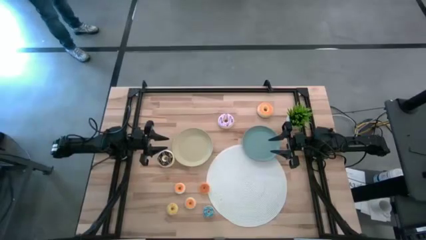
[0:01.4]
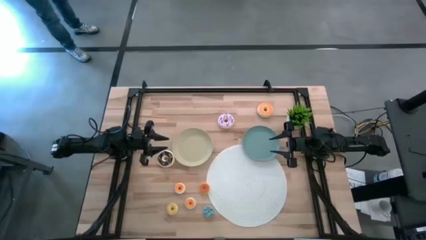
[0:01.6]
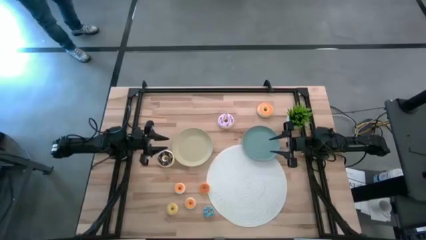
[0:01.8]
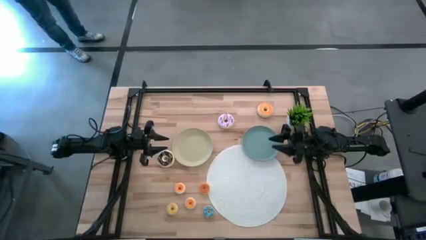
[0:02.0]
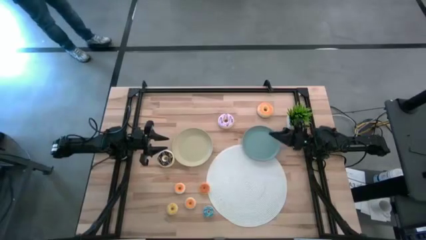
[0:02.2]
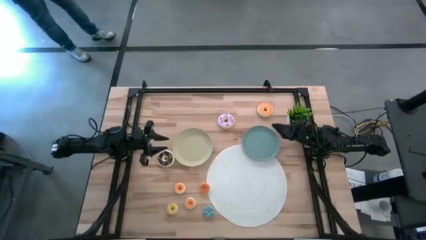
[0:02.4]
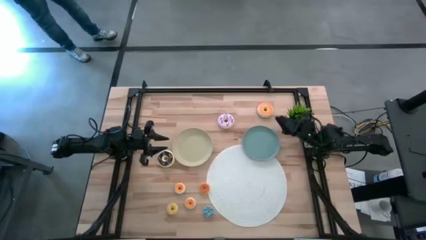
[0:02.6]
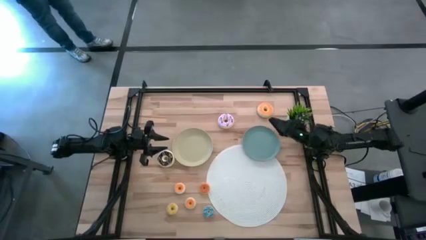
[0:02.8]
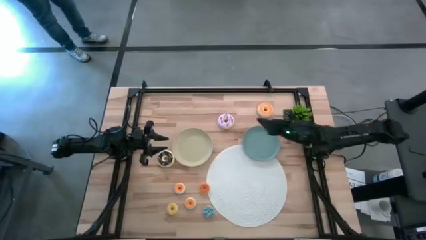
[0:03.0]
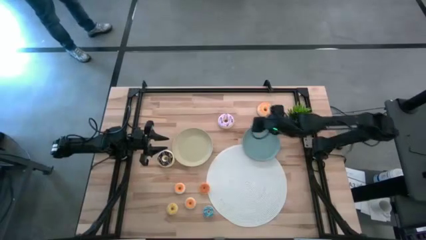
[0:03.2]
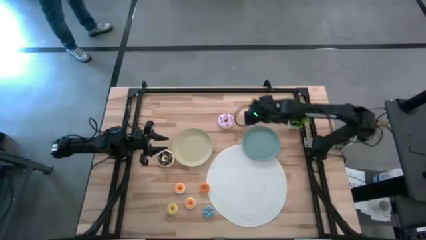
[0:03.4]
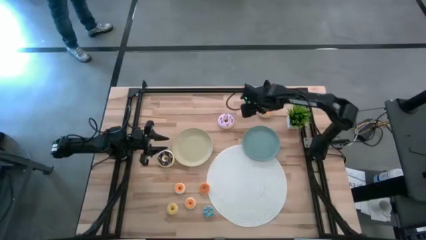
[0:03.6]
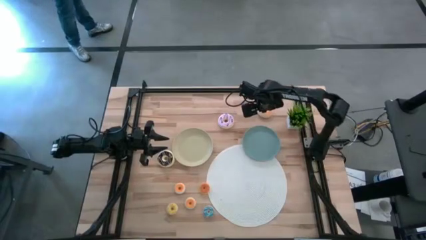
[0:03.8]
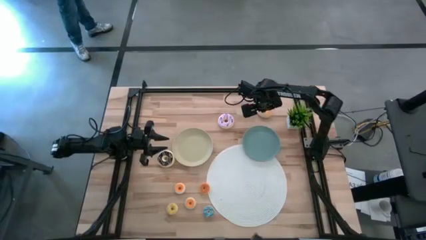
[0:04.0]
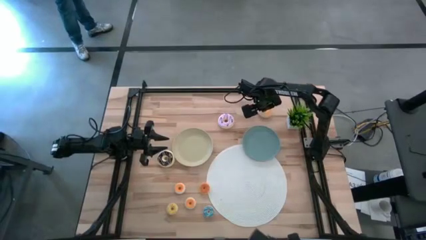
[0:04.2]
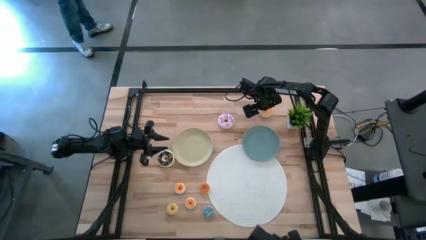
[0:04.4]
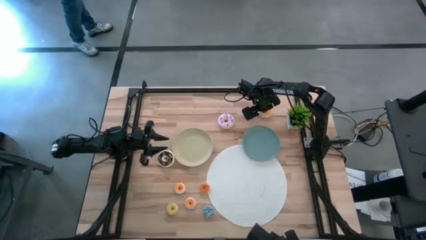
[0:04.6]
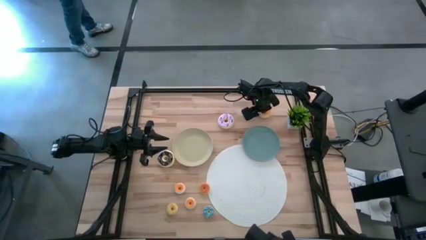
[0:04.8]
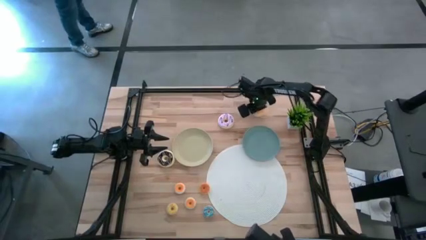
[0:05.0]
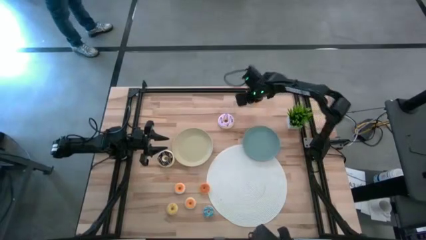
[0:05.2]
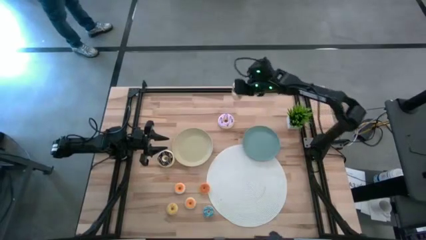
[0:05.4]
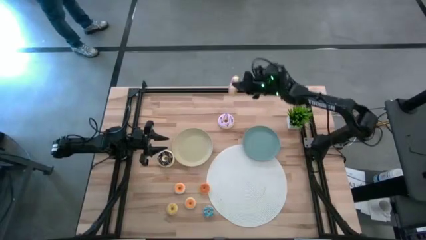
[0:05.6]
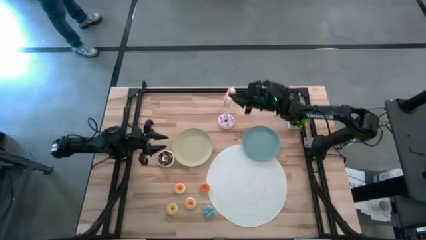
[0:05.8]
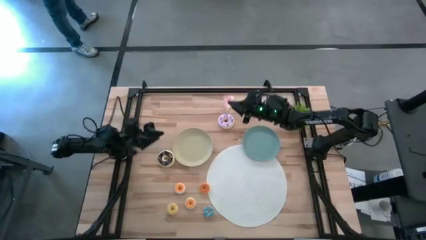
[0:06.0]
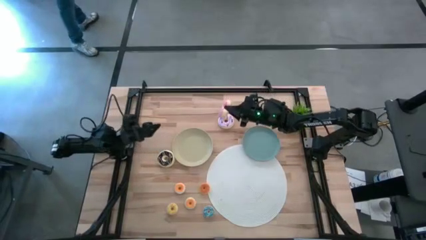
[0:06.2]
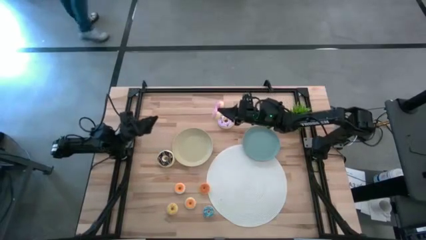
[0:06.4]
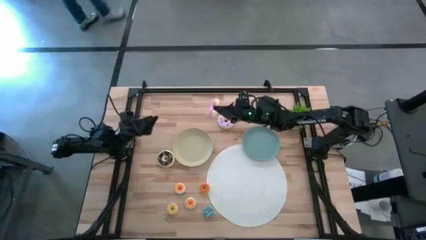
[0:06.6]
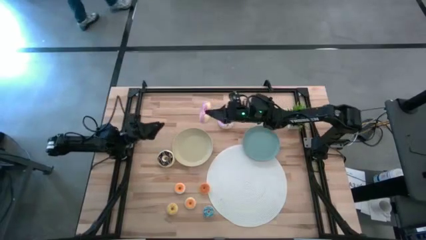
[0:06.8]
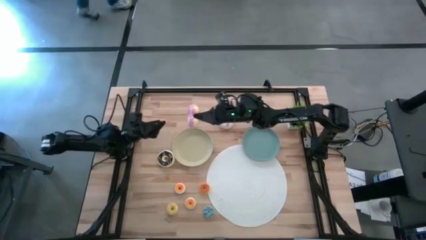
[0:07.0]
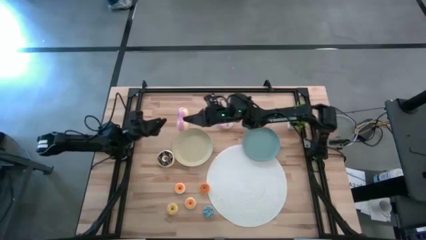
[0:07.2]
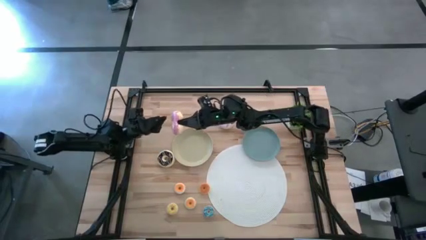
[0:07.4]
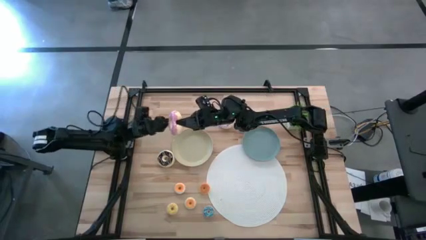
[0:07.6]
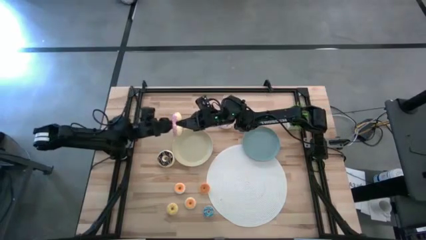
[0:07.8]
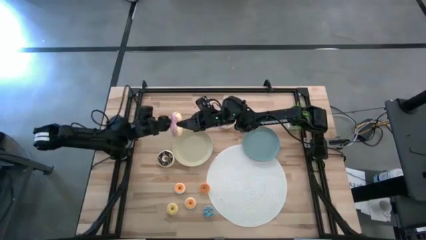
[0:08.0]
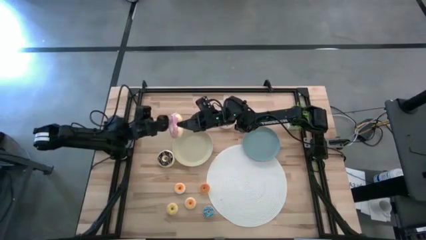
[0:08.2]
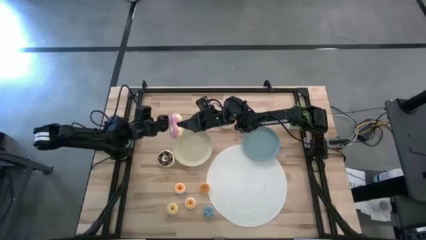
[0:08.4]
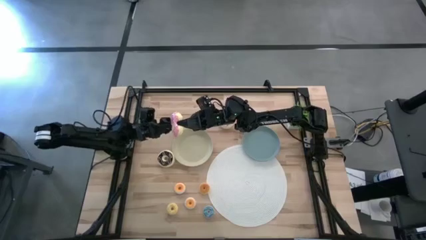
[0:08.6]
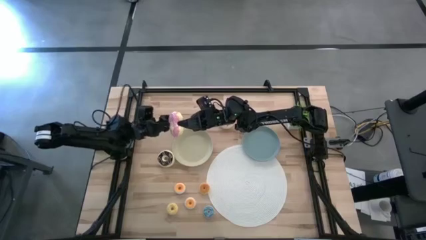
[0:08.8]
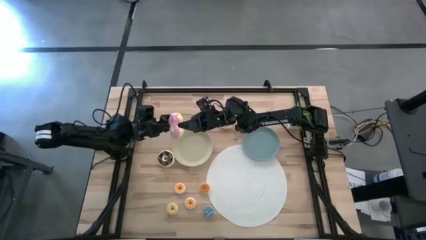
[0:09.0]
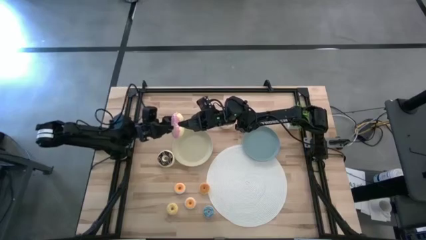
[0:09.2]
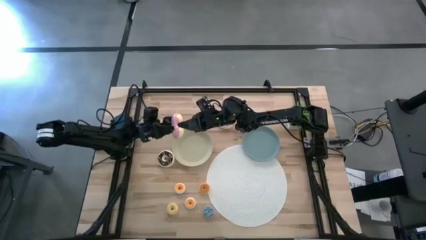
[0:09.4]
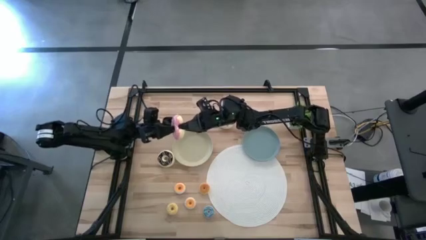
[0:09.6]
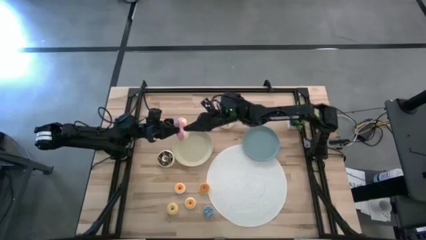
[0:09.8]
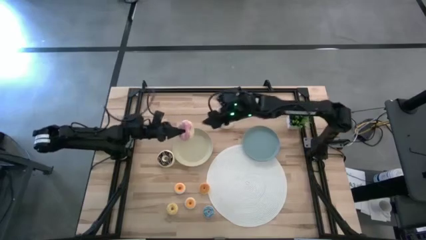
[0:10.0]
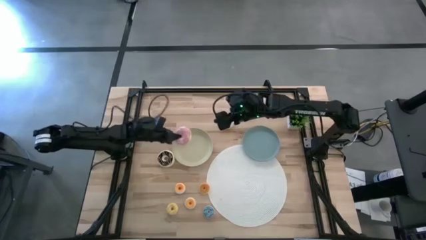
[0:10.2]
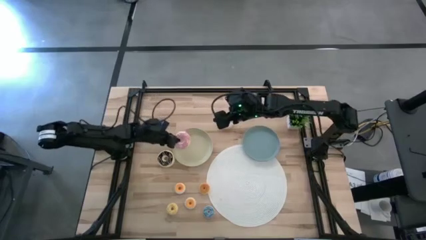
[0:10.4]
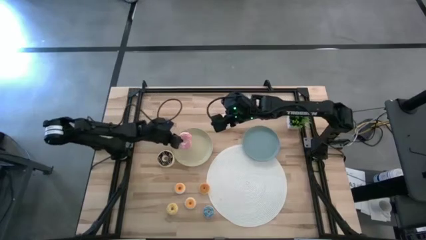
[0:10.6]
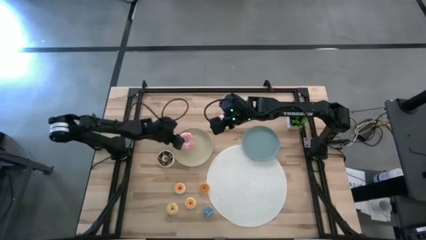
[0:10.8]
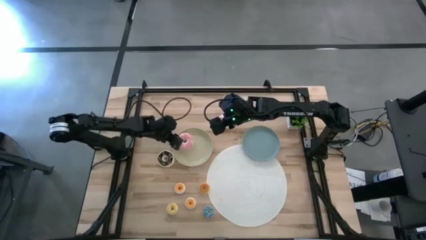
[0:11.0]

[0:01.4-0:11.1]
Task: Pick & Place donuts
Put the large pink donut on the brown plate

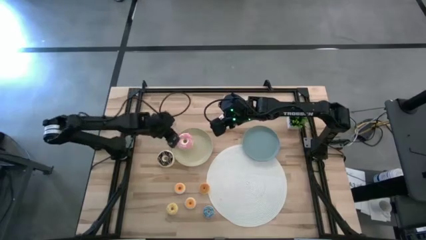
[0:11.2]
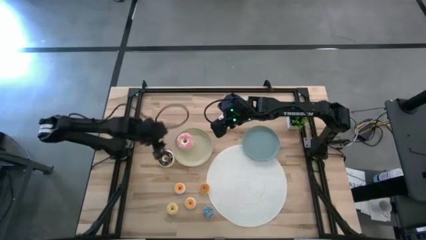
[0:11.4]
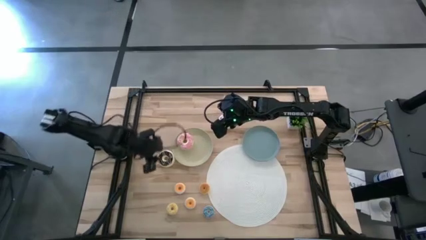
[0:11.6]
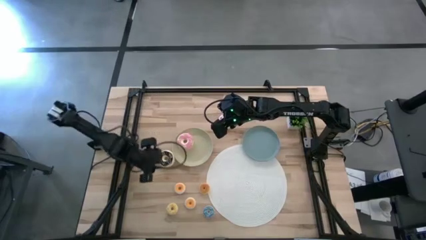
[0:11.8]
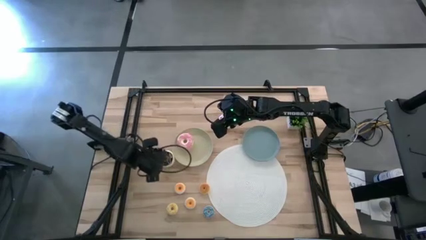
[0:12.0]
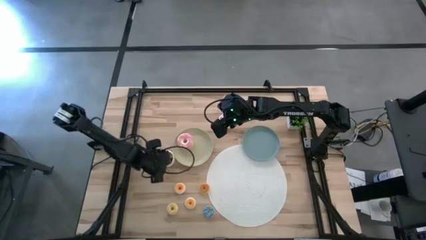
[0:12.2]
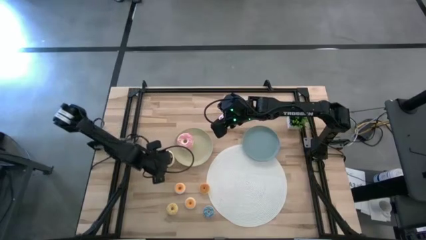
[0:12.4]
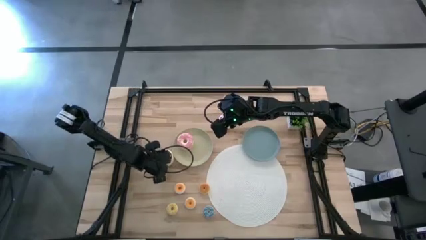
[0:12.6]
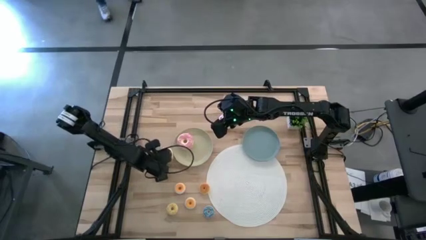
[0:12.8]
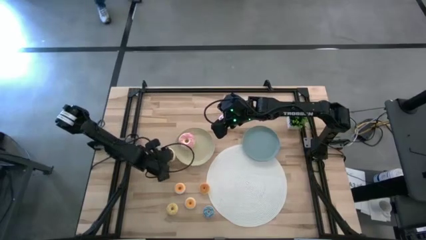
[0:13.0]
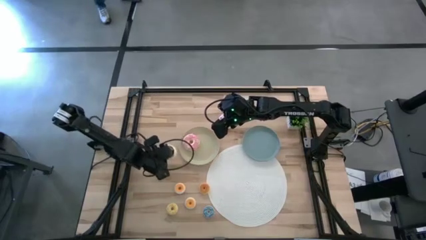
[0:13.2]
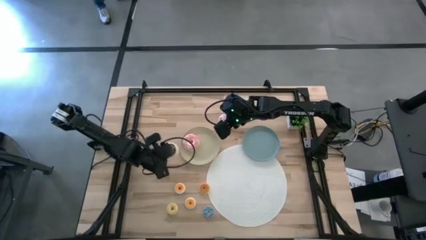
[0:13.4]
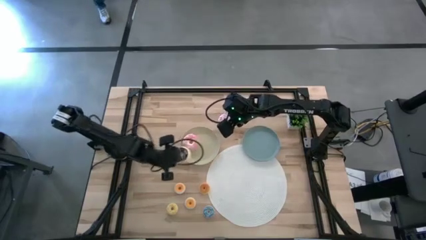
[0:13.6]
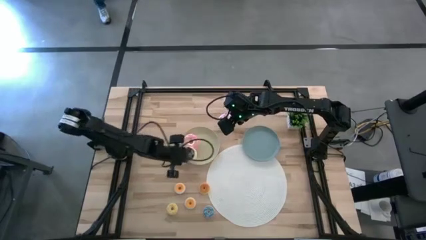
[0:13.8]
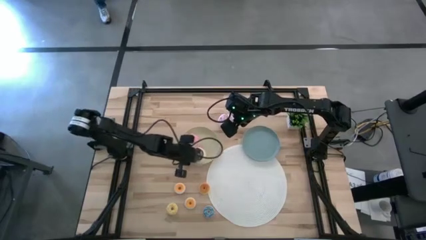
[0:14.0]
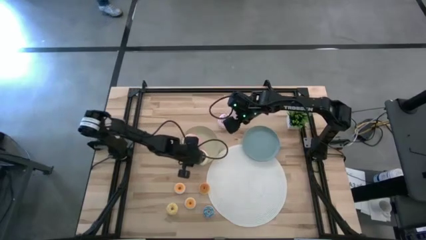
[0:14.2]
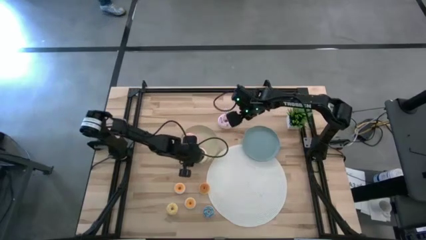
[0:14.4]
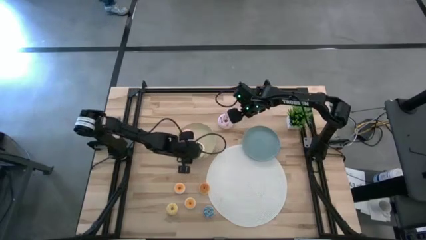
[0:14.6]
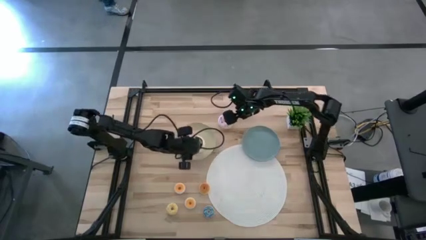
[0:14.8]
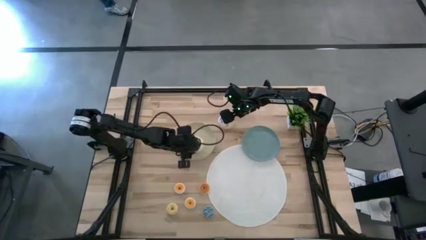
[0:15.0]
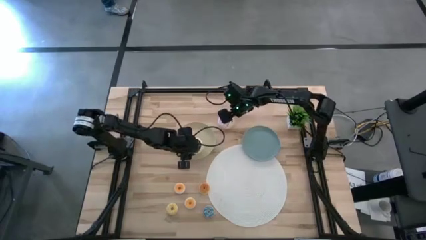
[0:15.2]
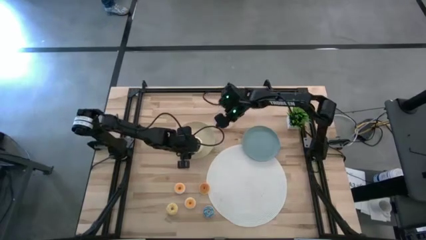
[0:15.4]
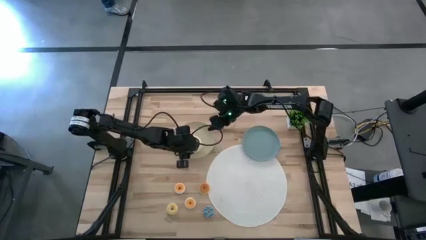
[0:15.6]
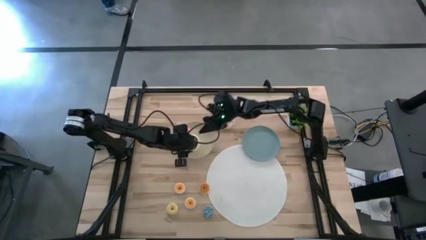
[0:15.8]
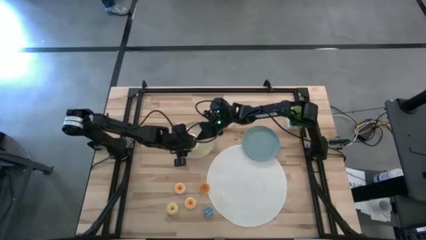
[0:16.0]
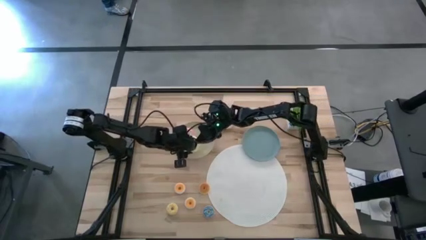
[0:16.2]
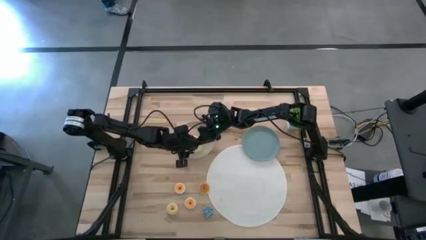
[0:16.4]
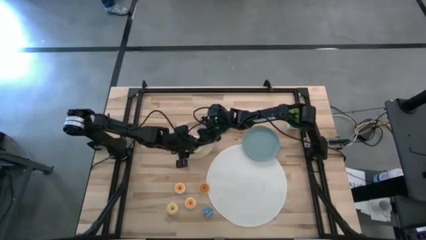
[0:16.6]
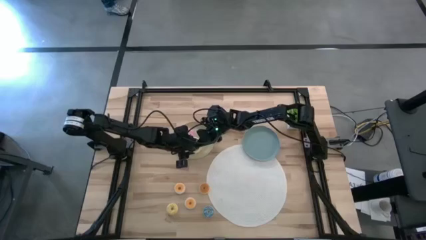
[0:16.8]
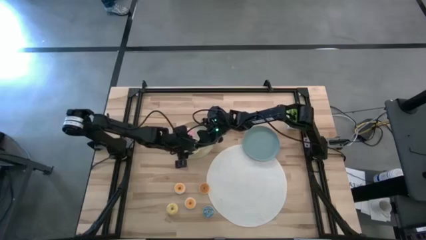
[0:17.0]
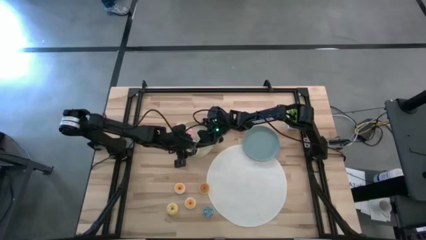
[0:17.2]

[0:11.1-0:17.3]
Put the large black donut on the brown plate

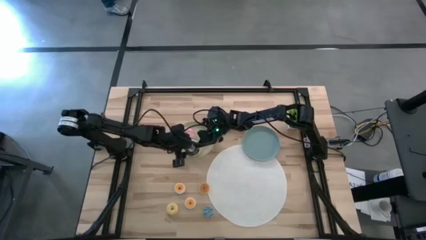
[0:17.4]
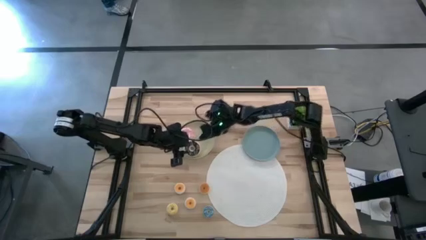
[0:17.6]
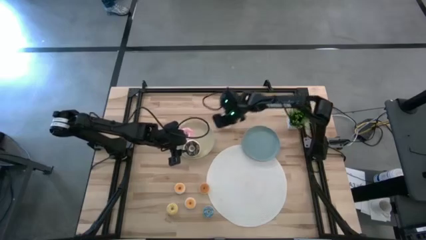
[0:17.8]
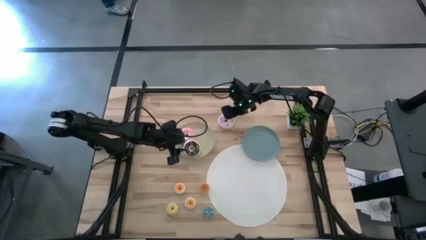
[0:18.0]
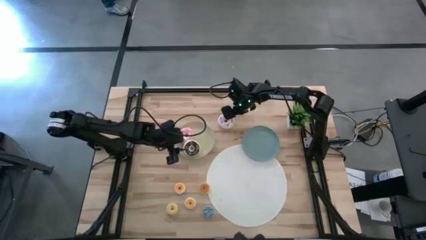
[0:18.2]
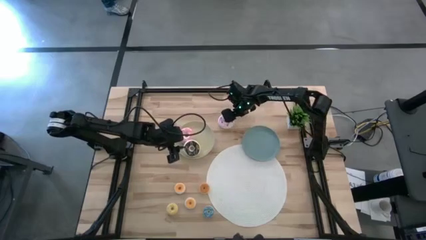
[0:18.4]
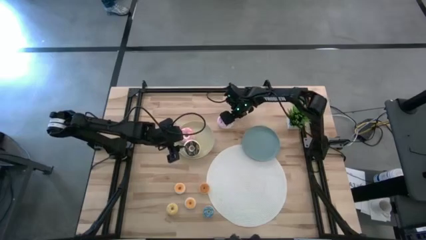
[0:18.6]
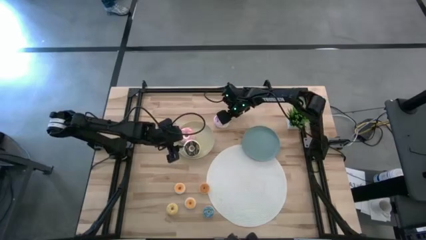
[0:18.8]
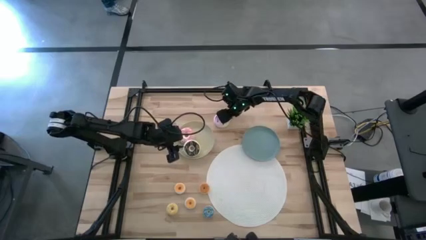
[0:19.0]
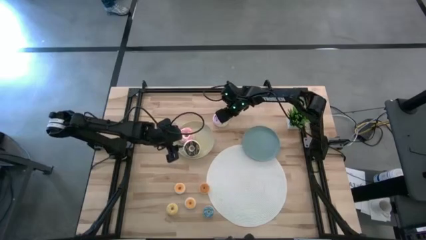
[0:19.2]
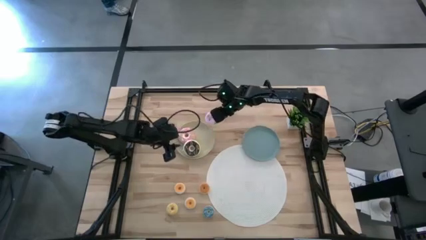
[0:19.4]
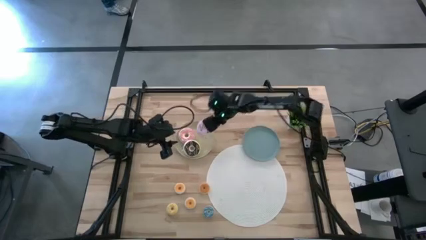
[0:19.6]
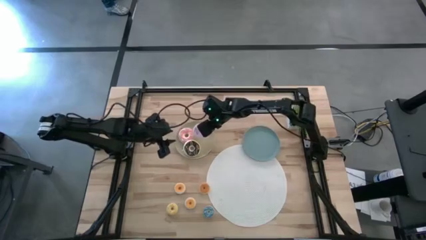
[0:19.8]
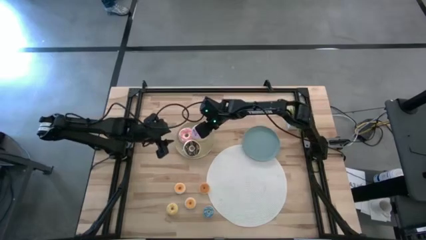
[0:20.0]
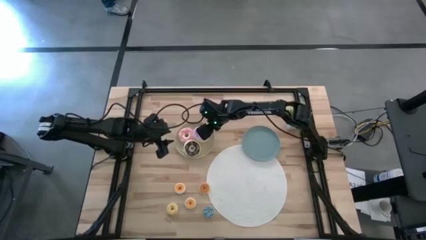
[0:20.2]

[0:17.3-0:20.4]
Put the large purple donut on the brown plate
